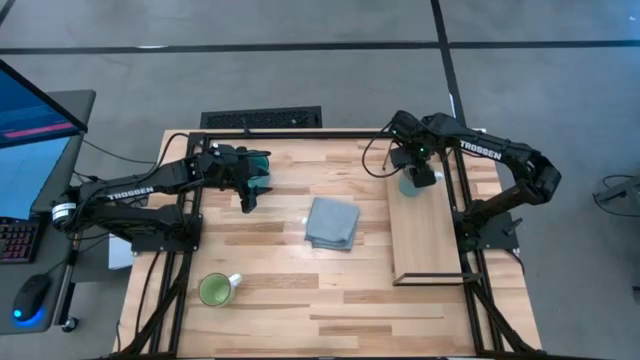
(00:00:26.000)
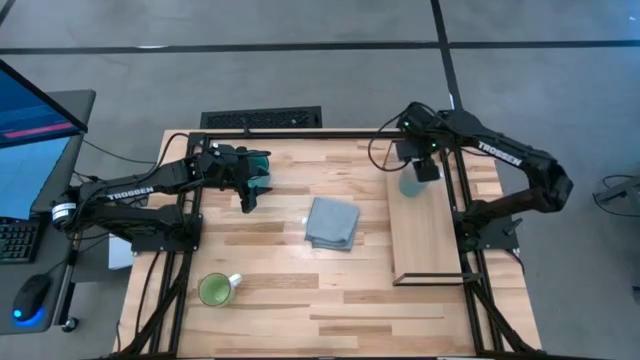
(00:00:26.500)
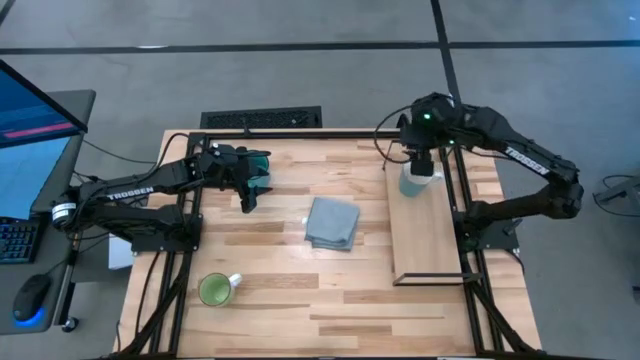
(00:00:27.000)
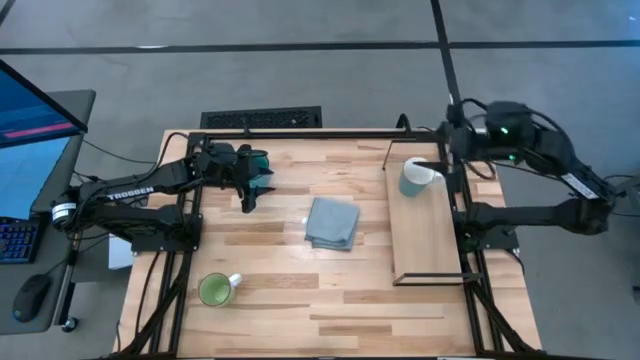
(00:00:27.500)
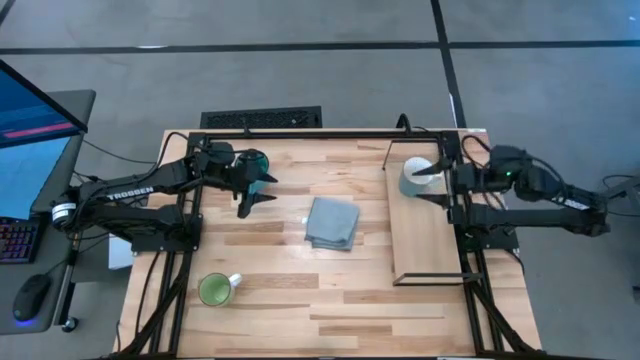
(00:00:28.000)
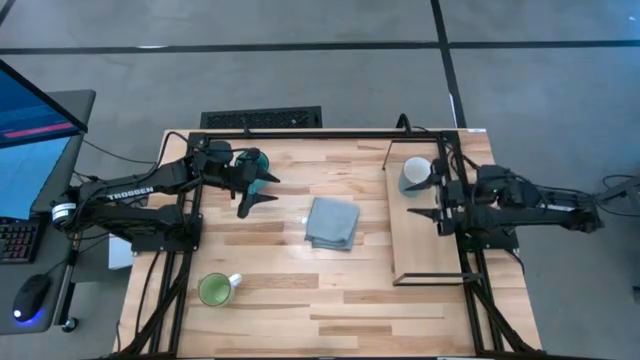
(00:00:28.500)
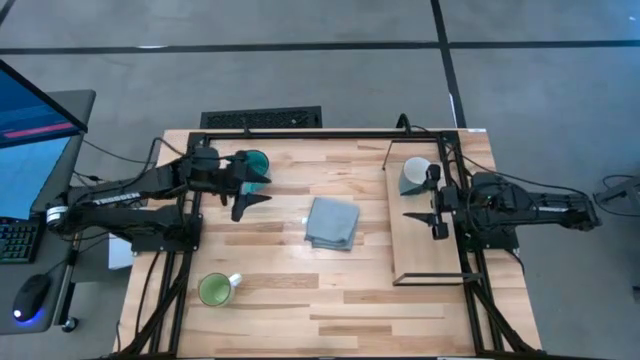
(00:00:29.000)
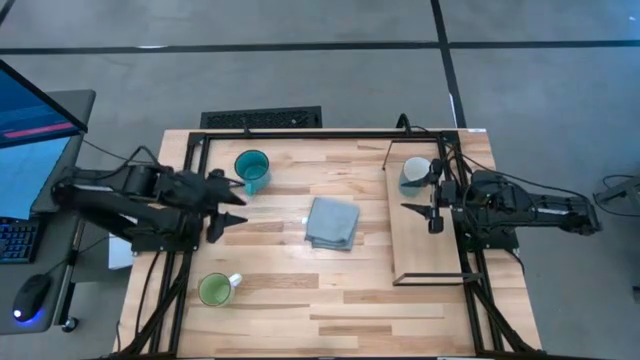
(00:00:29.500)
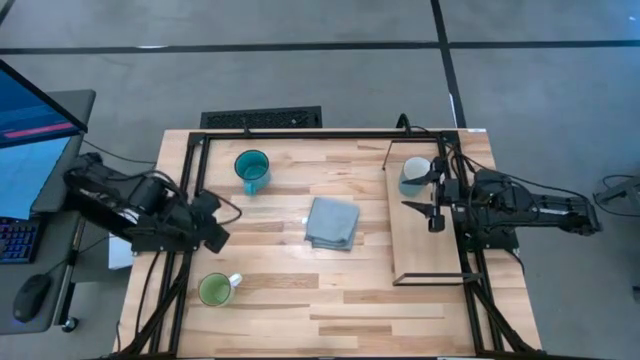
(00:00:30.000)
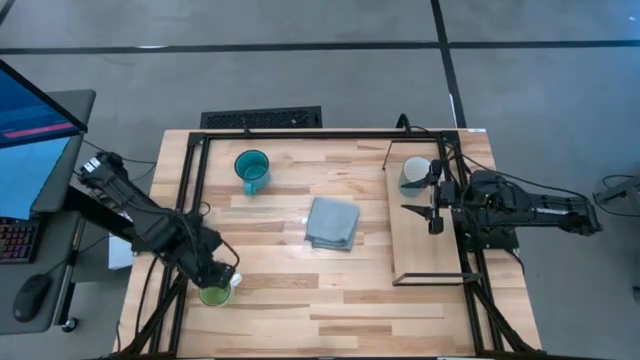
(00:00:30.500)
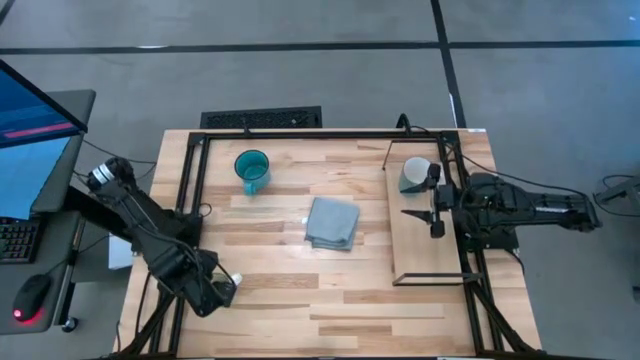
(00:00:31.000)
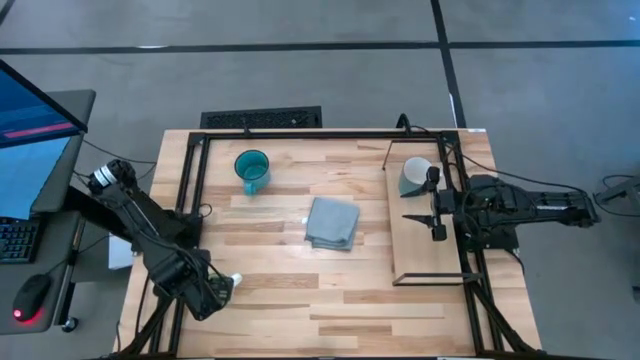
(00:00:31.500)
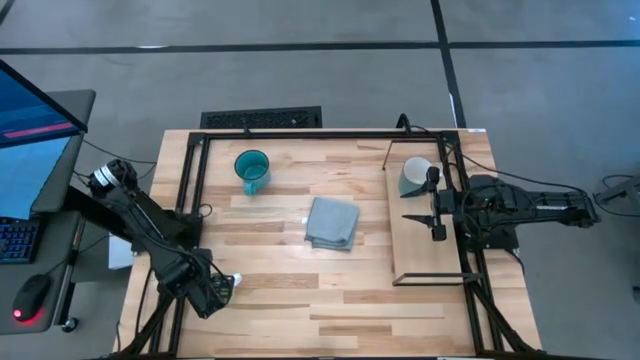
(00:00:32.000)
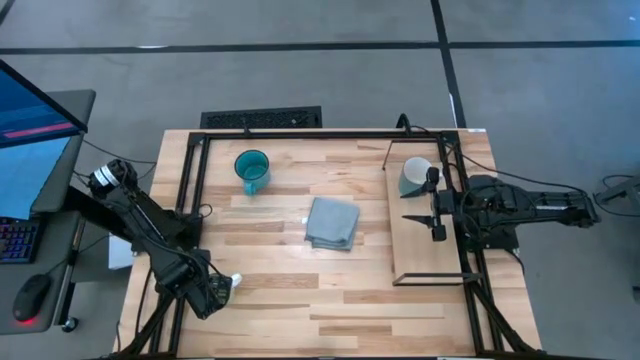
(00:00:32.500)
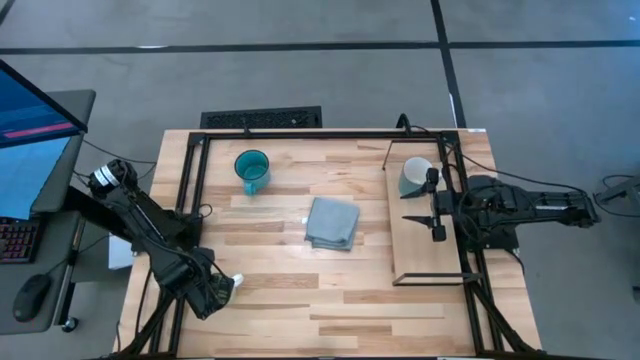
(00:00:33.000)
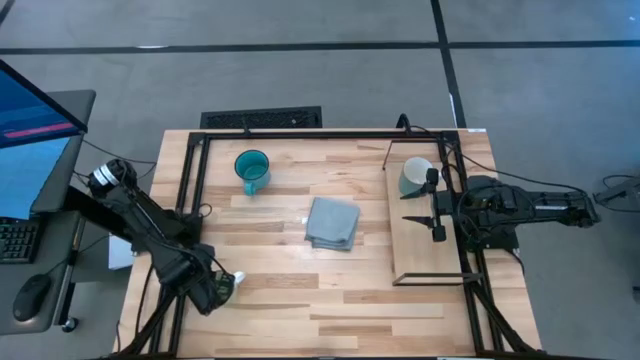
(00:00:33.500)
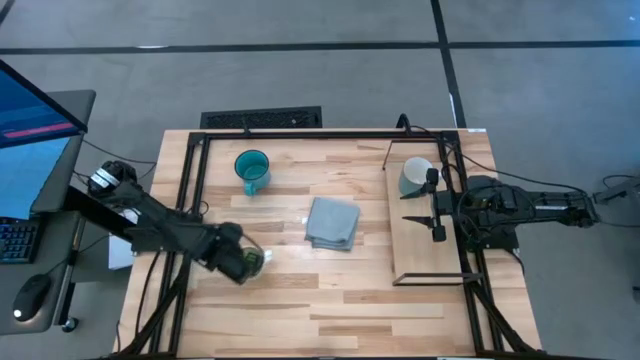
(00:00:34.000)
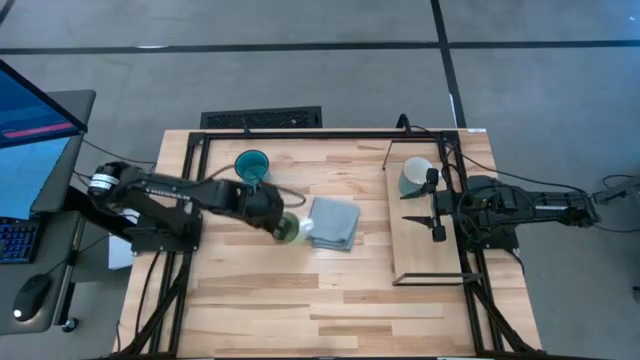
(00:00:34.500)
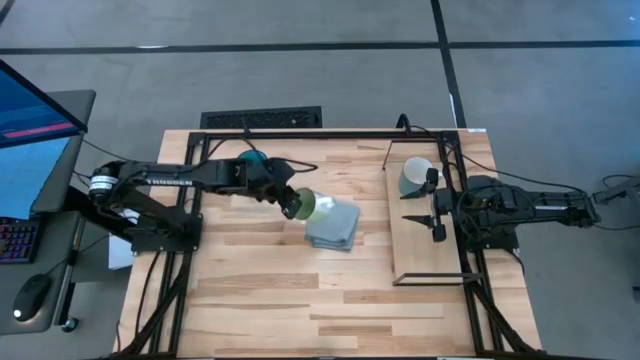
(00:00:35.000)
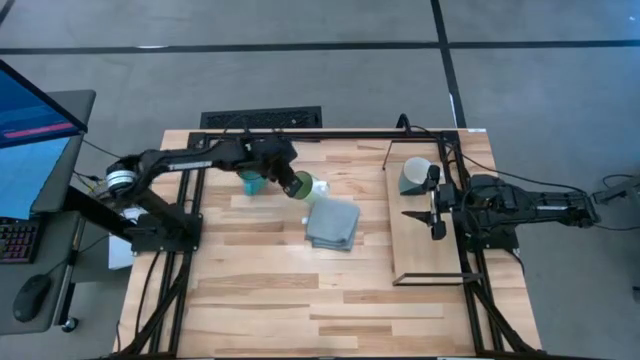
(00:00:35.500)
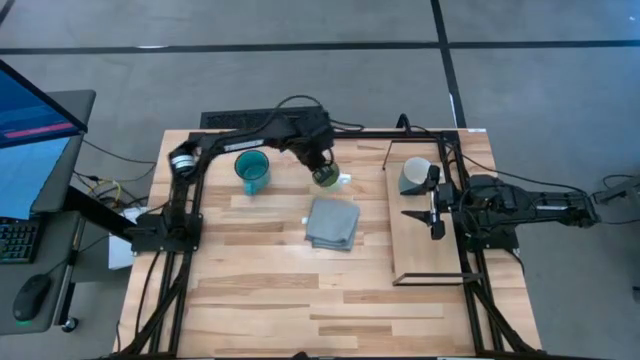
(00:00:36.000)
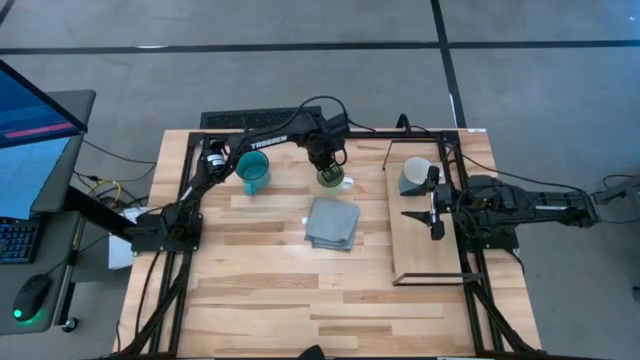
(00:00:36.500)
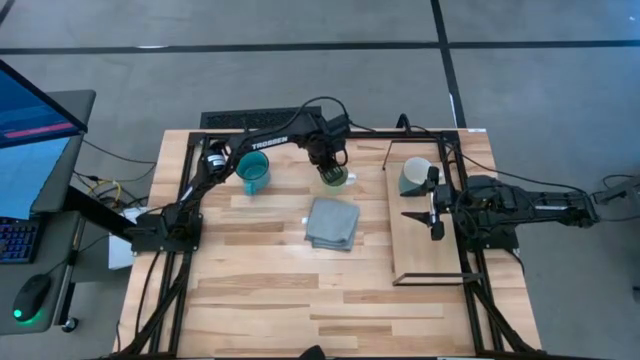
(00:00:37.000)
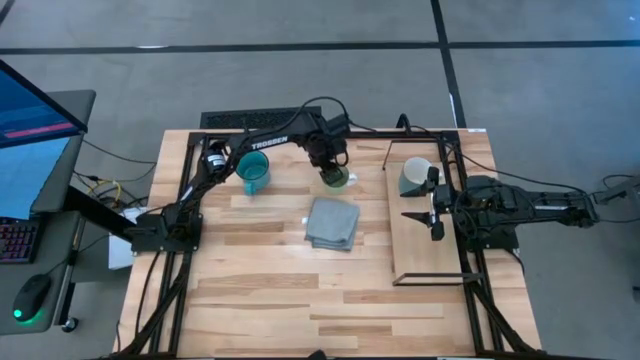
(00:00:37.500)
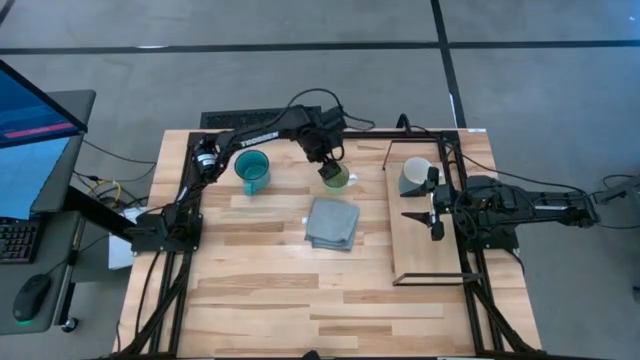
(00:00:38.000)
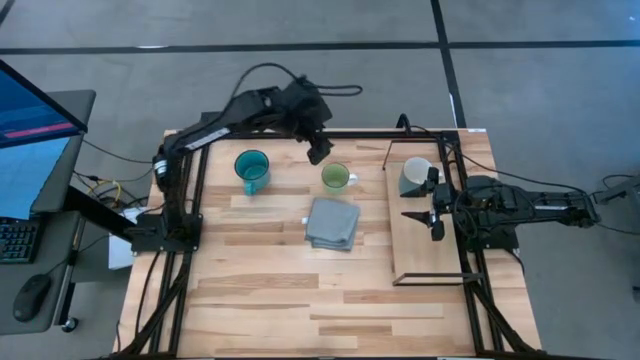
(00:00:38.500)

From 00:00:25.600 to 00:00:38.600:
Task: Stack small to large cups/mugs on shelf
Put the green mug on the shelf
